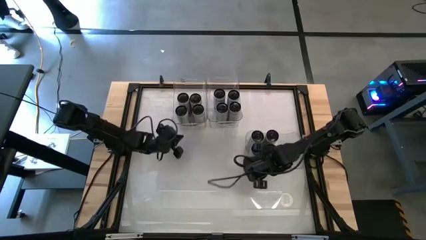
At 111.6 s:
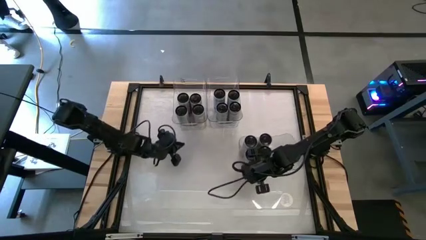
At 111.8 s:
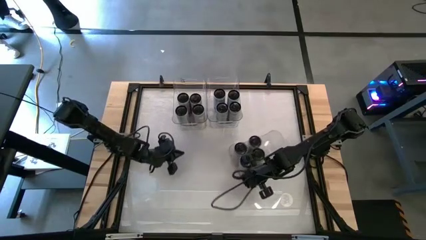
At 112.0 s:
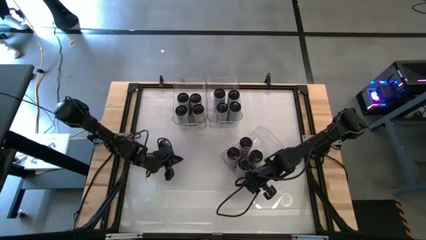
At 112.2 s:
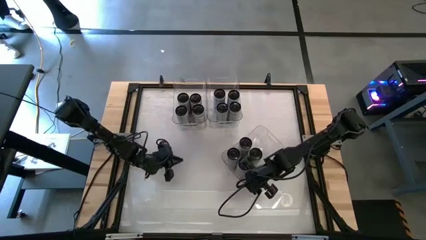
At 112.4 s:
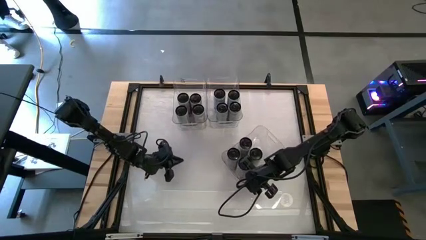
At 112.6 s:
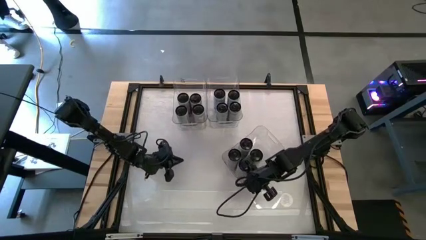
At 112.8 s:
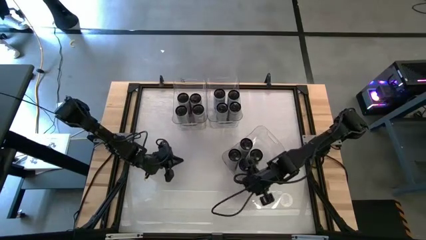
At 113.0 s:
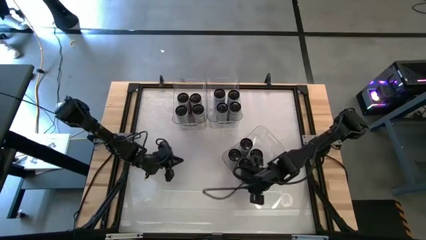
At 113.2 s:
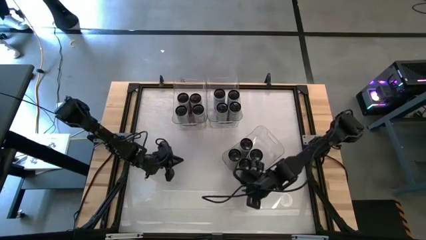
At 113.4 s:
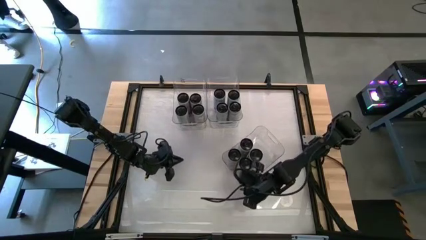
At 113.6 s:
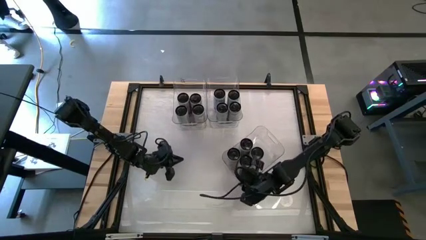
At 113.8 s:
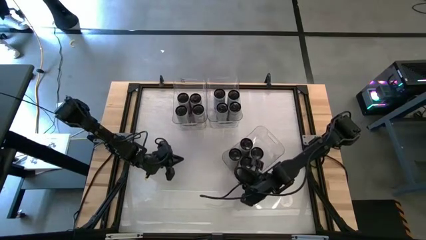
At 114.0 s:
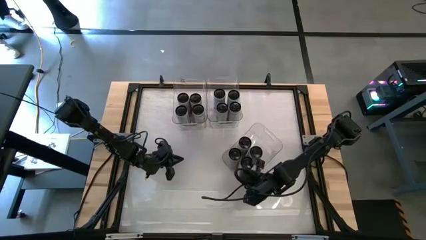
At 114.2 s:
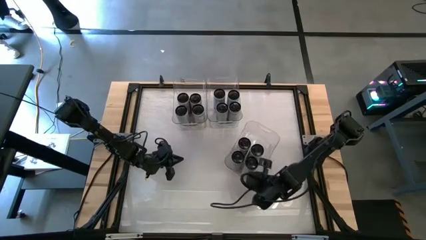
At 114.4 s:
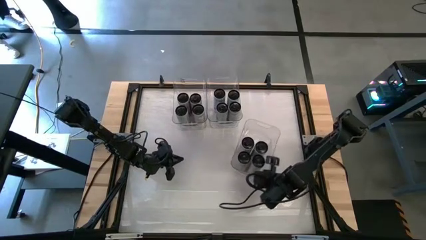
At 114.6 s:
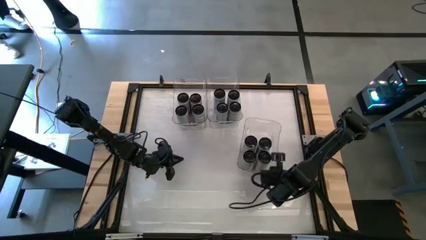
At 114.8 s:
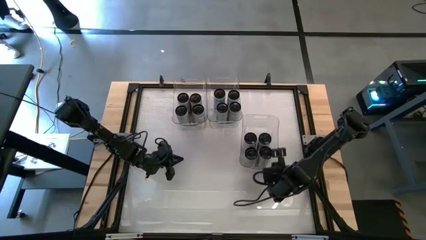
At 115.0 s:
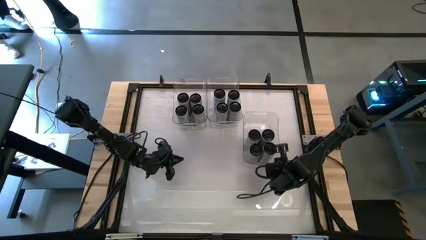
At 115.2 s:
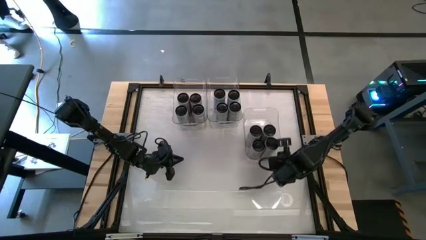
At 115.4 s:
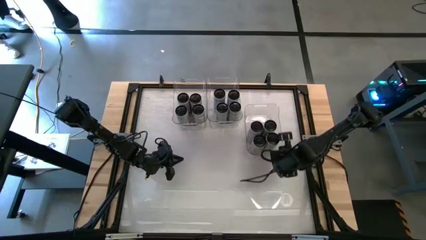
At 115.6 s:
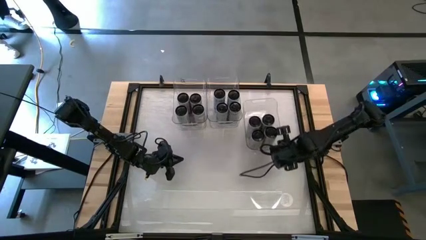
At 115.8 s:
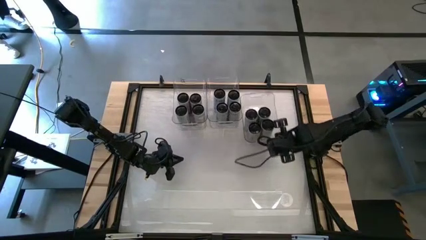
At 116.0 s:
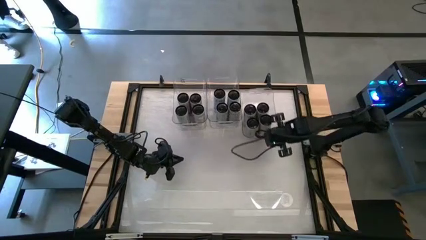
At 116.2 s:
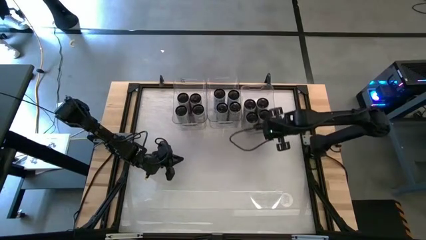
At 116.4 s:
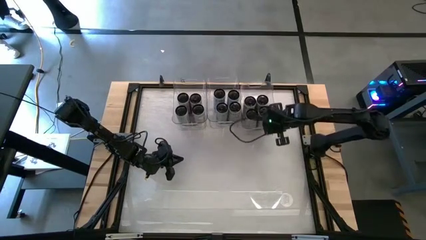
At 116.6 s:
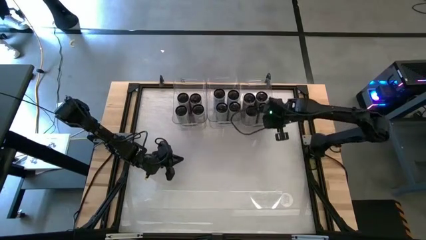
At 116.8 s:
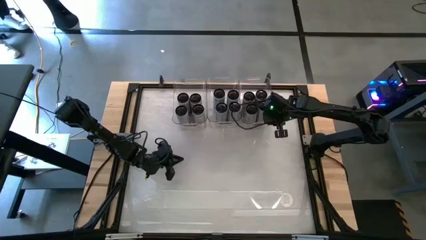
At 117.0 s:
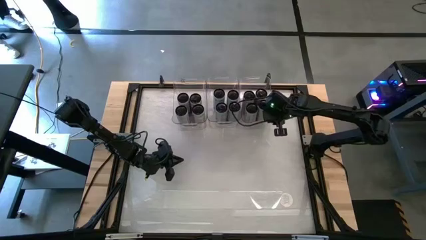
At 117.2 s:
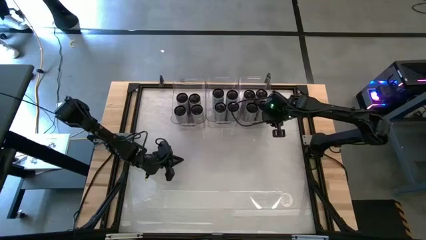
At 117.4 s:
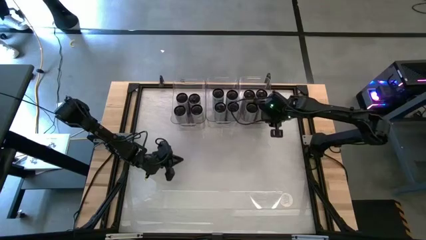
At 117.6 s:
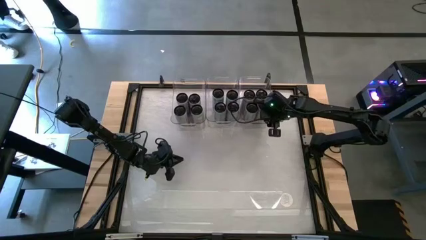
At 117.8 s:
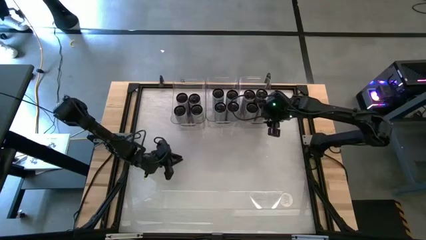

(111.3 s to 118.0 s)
Task: Sort soda cans
Move the bottom right transparent bin to the top right of the table

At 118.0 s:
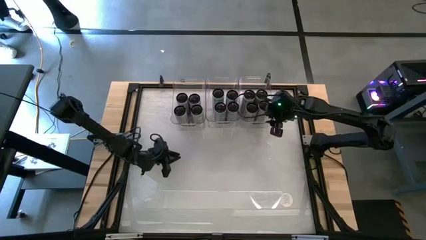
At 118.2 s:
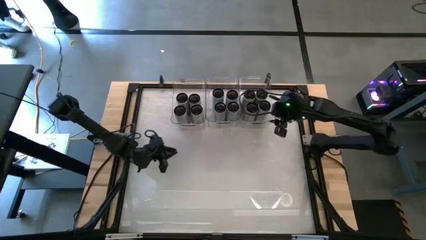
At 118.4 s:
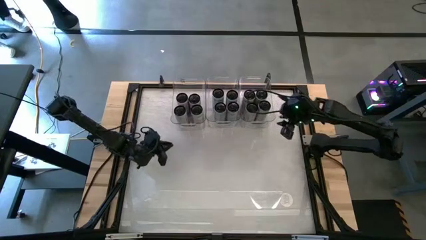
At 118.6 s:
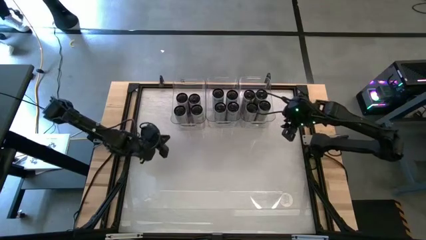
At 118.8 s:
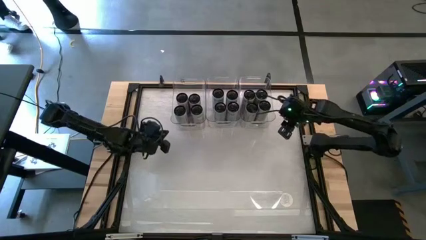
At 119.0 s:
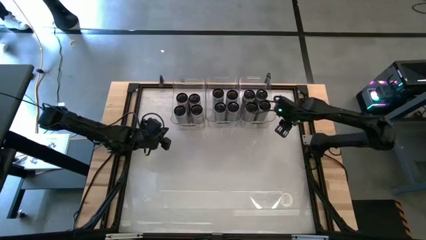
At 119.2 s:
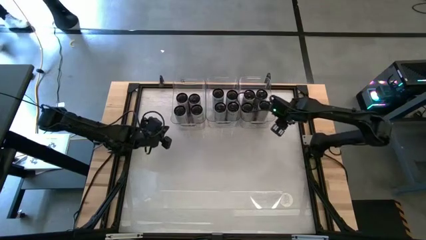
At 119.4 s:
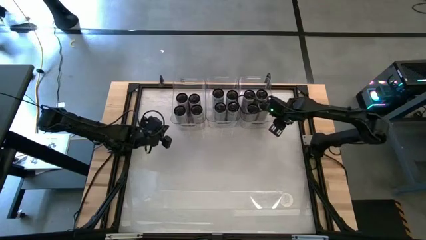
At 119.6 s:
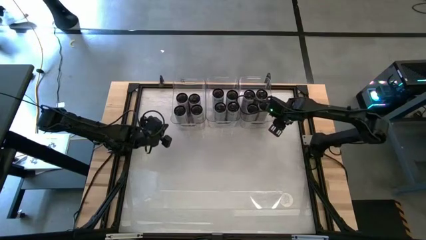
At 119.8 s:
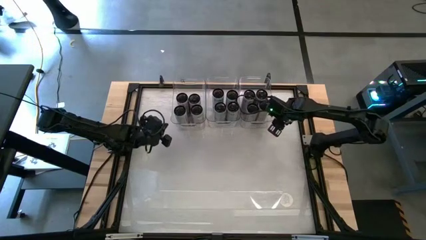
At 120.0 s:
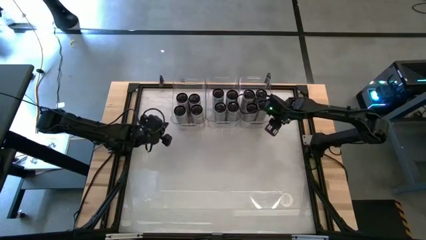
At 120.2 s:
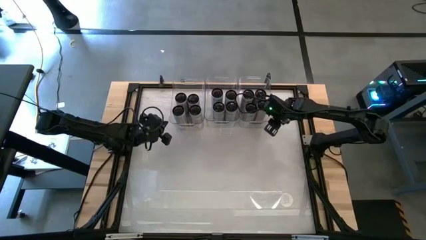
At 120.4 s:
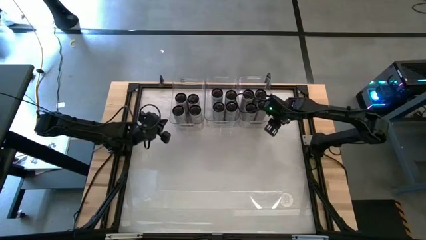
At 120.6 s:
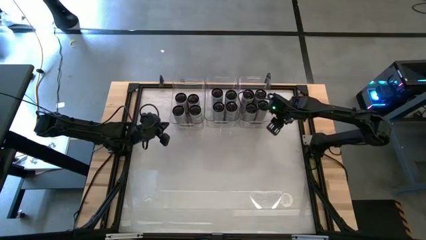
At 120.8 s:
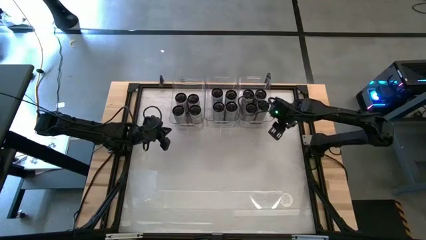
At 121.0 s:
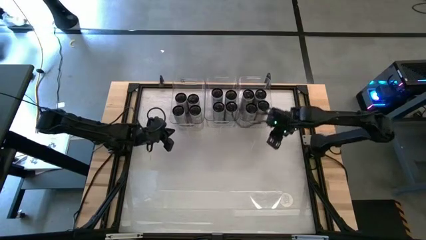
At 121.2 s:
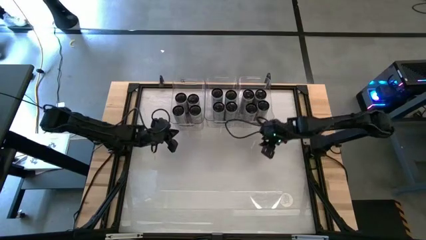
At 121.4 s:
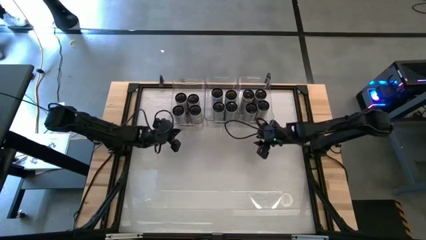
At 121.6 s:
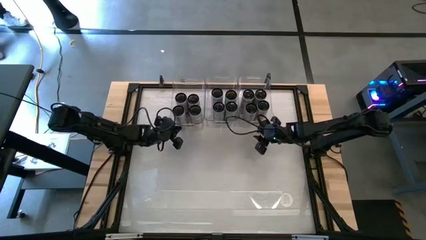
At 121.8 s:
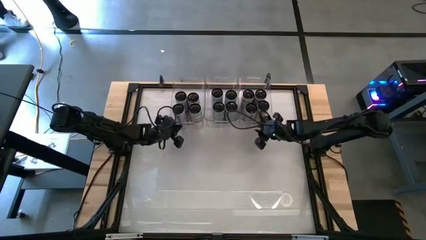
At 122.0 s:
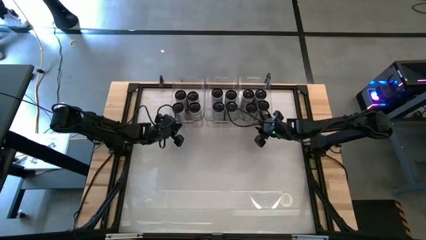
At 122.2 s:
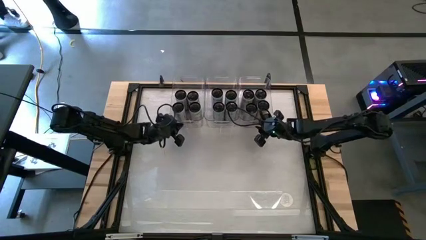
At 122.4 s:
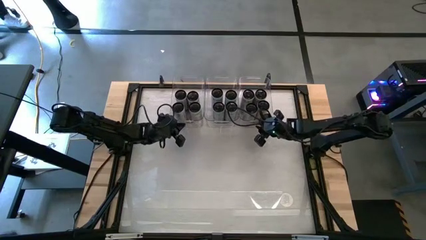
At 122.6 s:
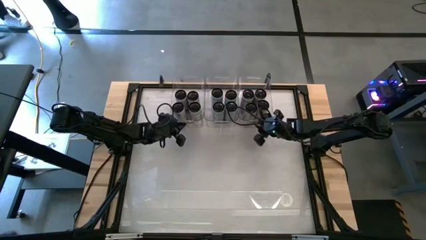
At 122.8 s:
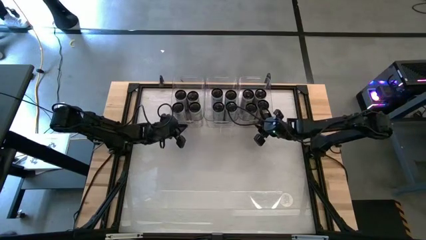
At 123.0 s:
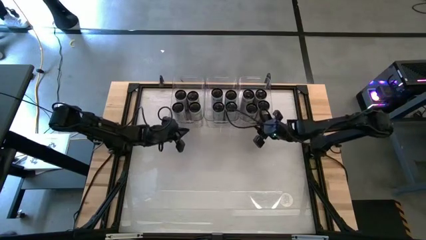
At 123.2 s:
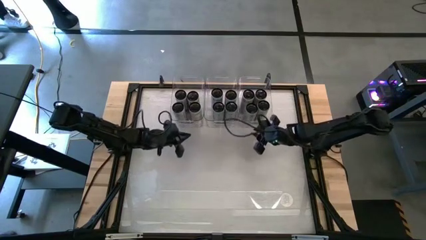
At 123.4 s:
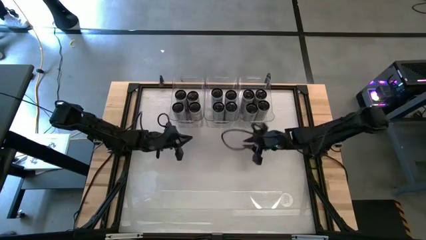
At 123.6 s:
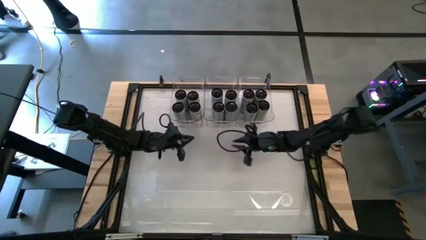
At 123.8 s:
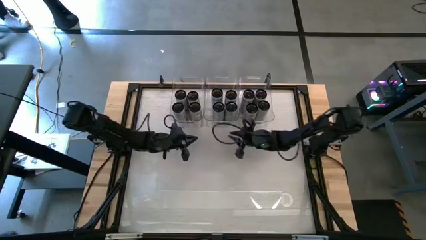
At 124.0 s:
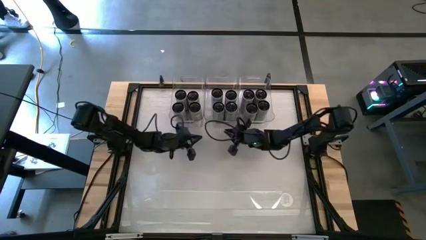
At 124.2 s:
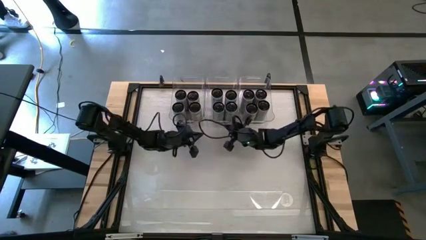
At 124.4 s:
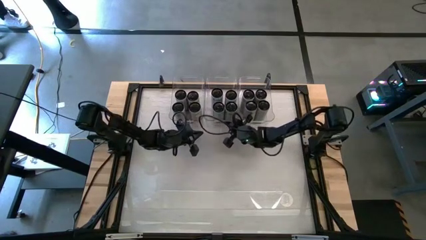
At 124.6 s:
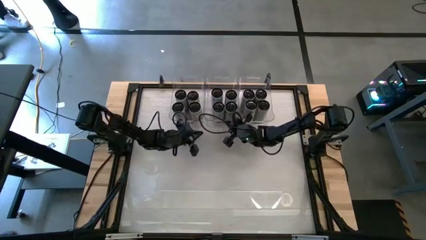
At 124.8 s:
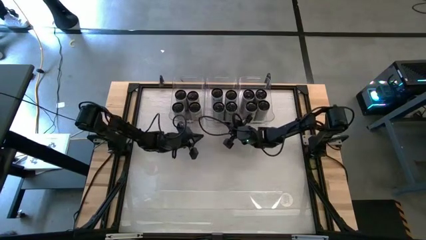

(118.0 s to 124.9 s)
Adjust the transparent bins
